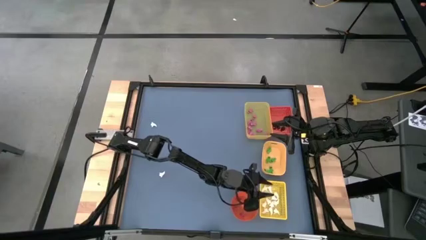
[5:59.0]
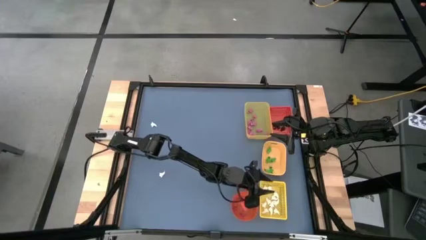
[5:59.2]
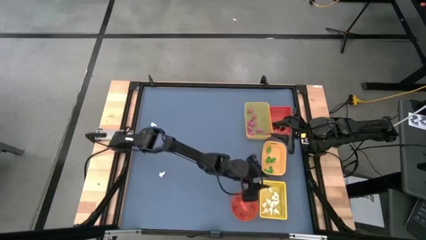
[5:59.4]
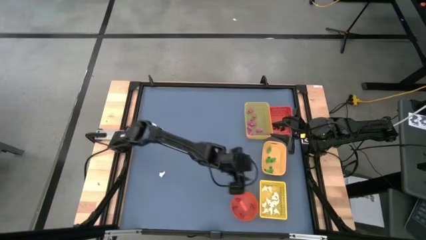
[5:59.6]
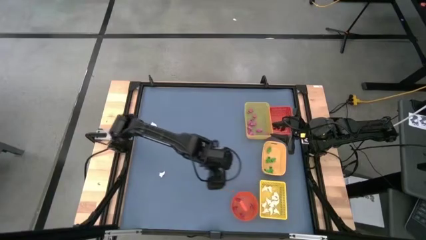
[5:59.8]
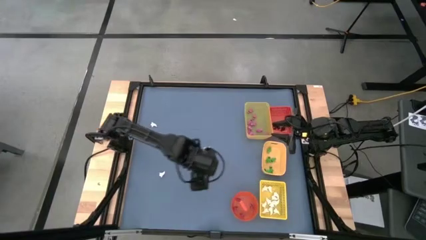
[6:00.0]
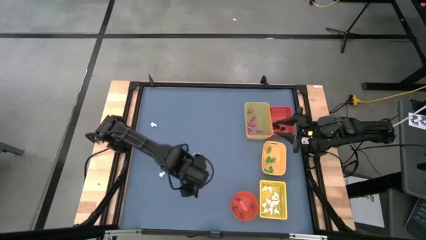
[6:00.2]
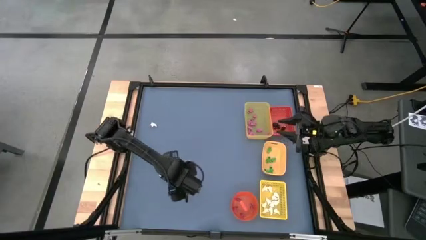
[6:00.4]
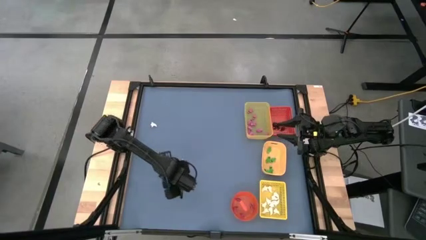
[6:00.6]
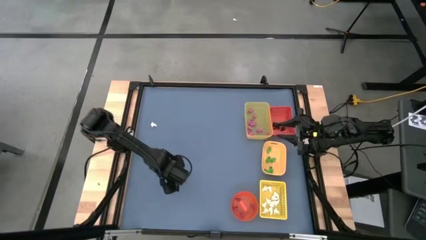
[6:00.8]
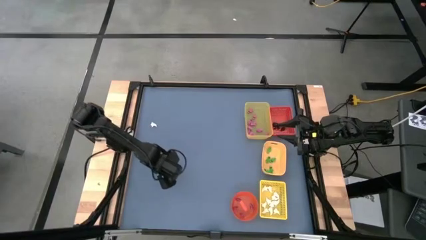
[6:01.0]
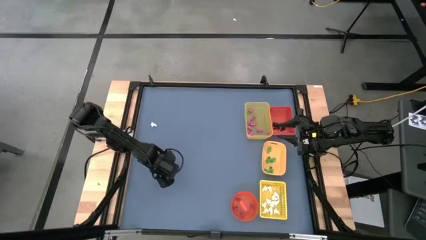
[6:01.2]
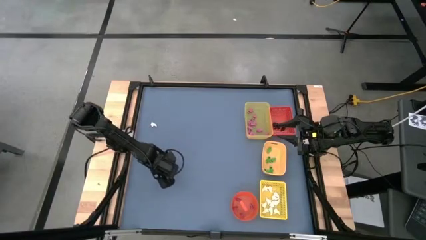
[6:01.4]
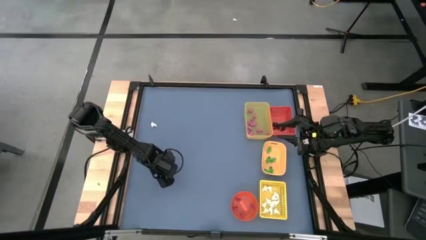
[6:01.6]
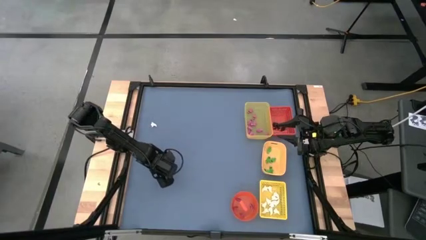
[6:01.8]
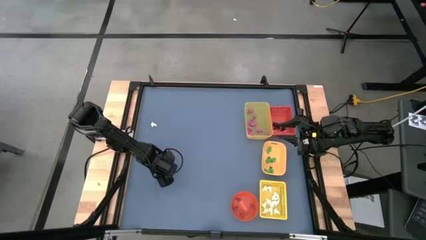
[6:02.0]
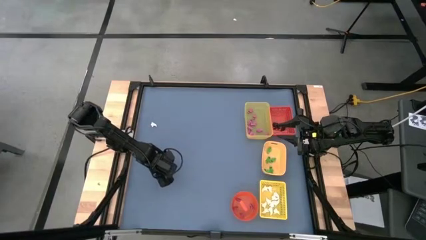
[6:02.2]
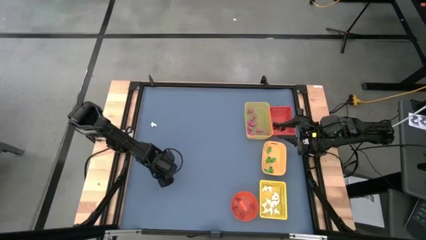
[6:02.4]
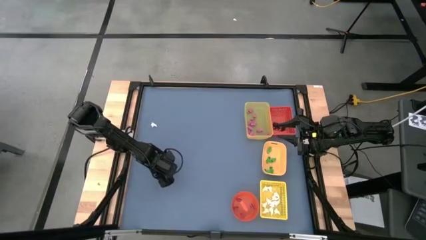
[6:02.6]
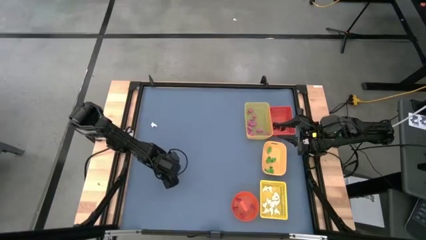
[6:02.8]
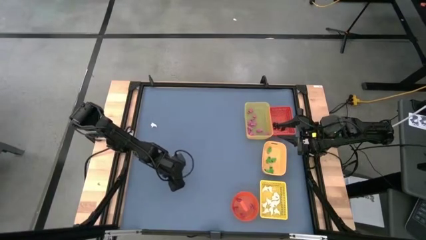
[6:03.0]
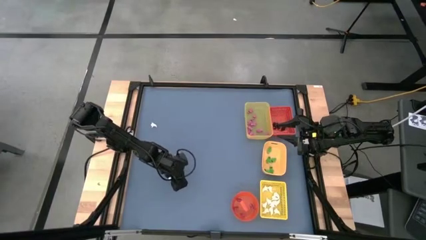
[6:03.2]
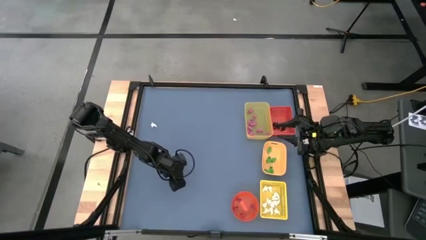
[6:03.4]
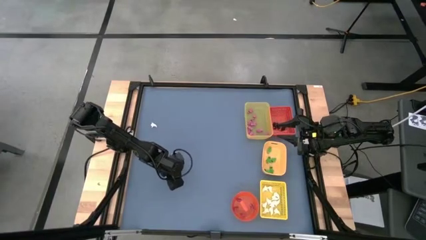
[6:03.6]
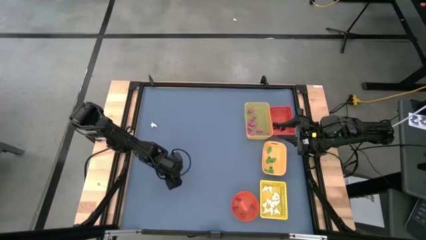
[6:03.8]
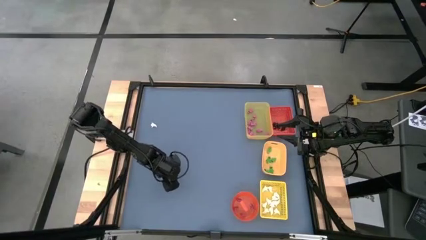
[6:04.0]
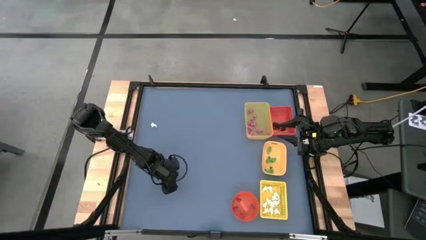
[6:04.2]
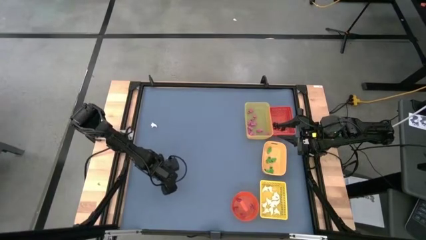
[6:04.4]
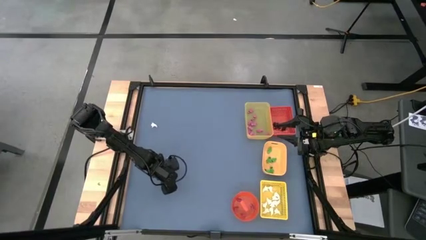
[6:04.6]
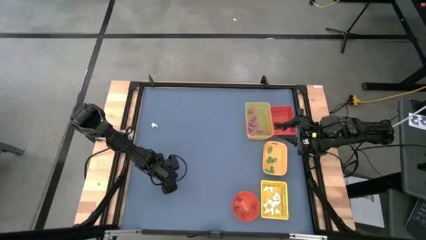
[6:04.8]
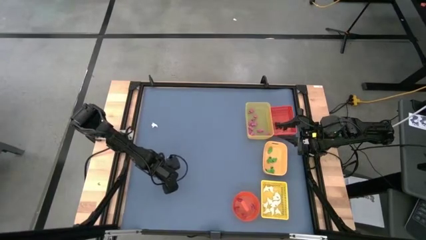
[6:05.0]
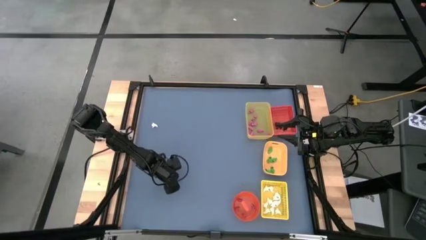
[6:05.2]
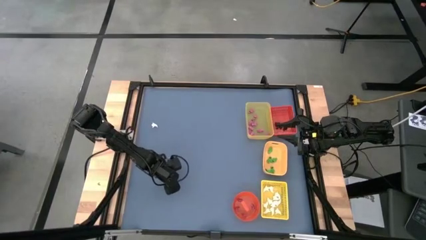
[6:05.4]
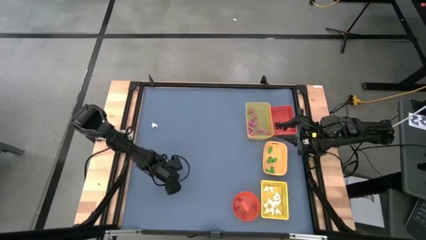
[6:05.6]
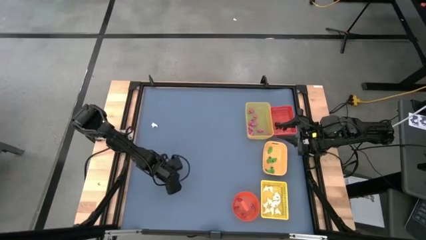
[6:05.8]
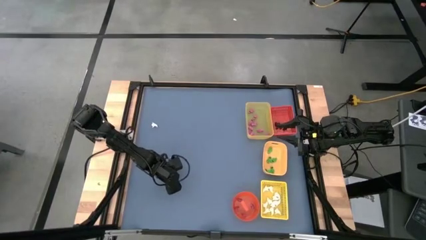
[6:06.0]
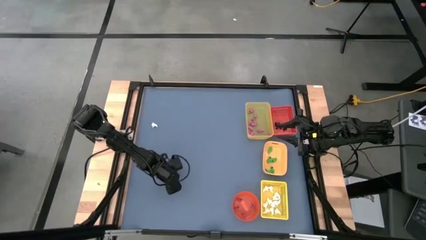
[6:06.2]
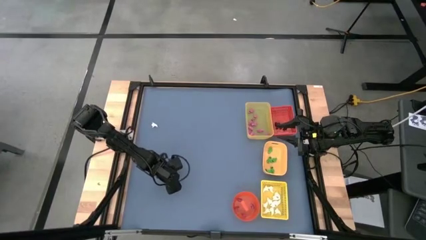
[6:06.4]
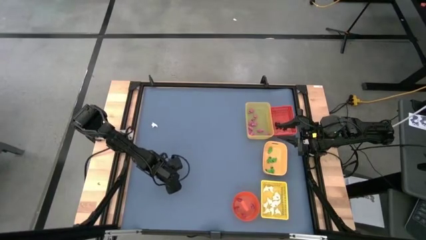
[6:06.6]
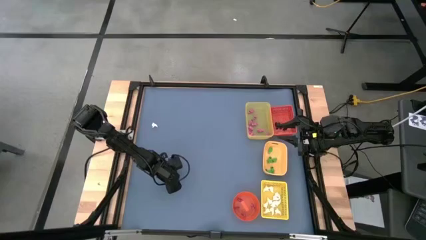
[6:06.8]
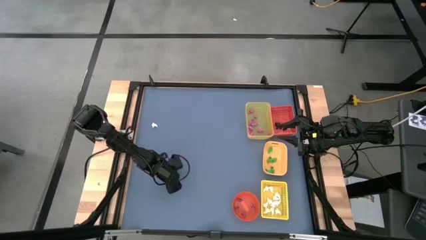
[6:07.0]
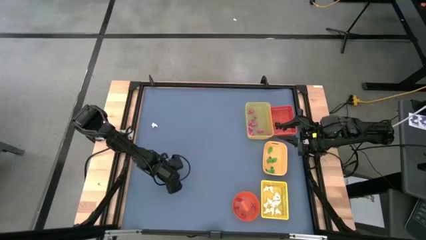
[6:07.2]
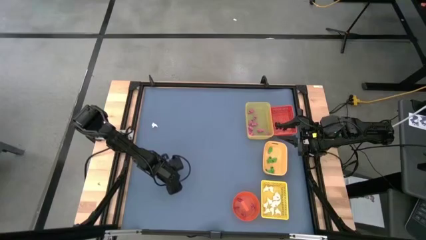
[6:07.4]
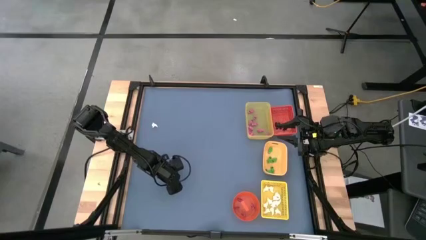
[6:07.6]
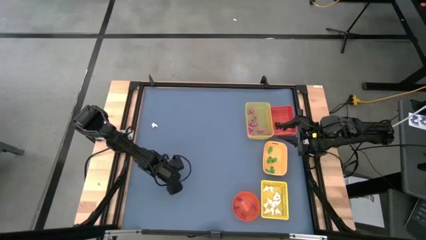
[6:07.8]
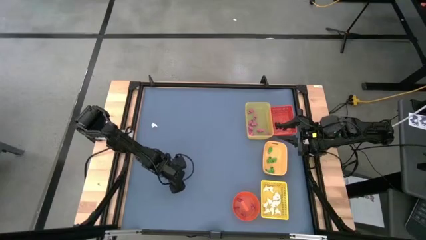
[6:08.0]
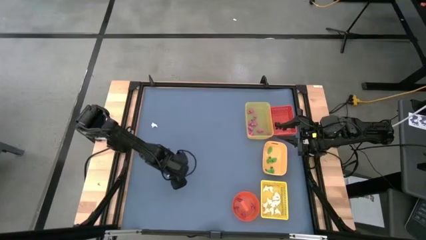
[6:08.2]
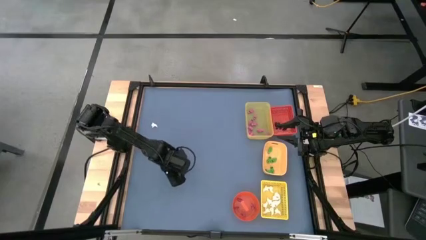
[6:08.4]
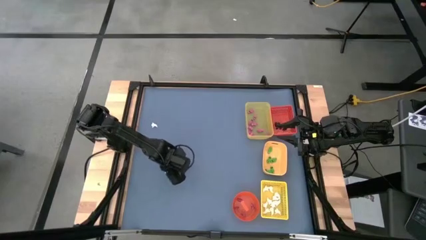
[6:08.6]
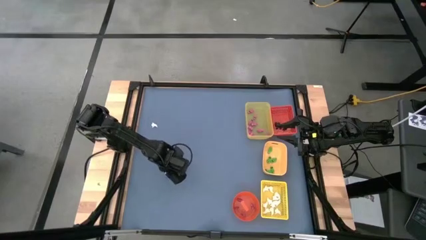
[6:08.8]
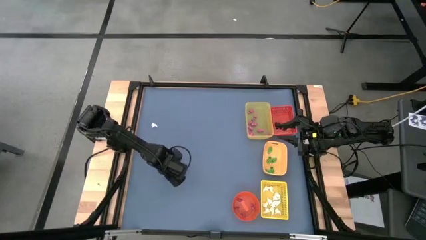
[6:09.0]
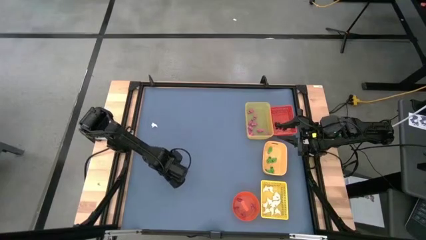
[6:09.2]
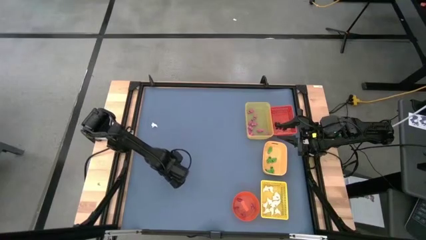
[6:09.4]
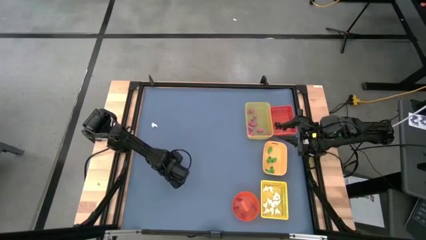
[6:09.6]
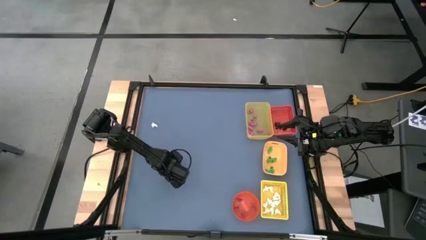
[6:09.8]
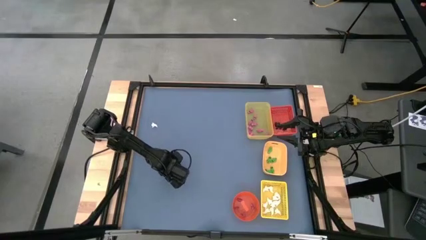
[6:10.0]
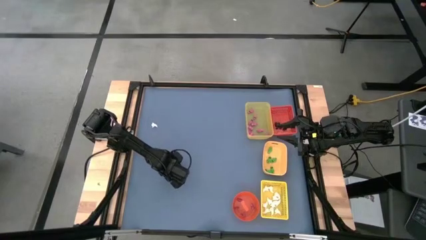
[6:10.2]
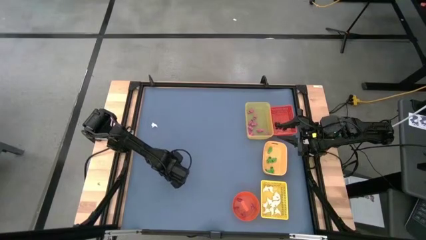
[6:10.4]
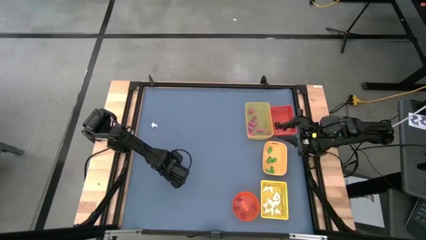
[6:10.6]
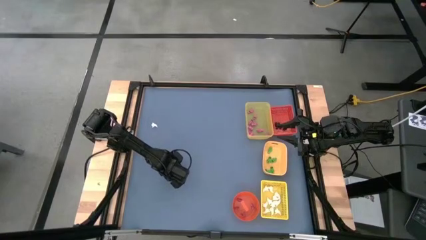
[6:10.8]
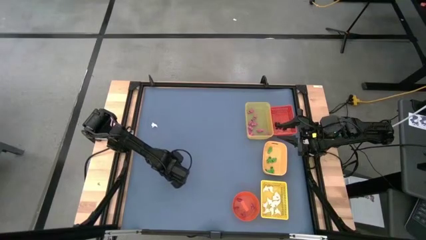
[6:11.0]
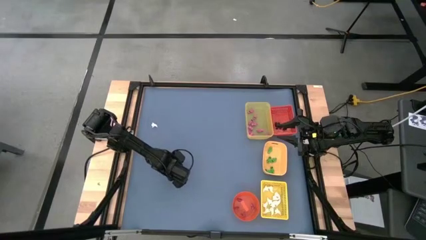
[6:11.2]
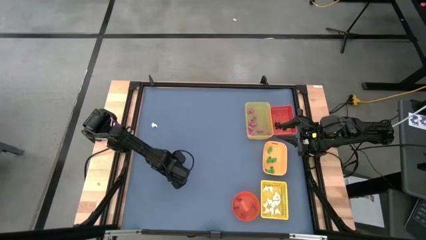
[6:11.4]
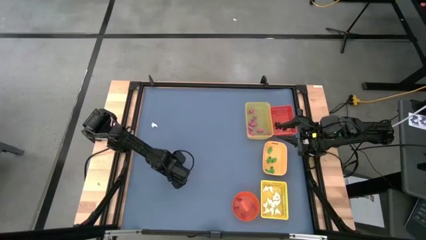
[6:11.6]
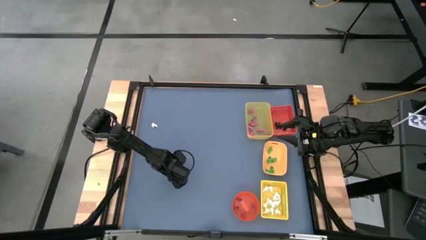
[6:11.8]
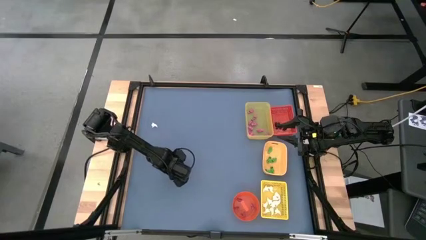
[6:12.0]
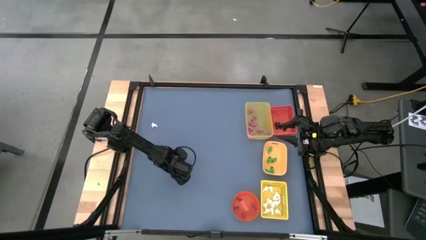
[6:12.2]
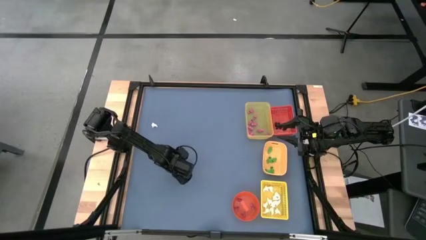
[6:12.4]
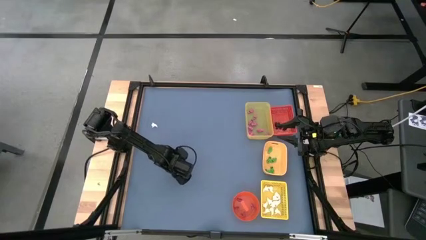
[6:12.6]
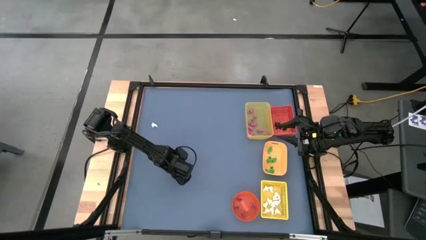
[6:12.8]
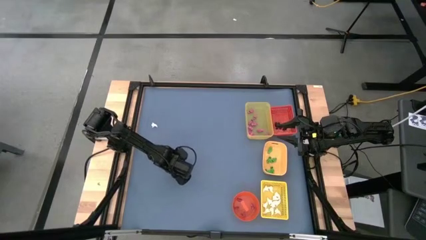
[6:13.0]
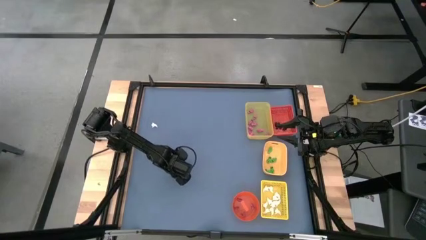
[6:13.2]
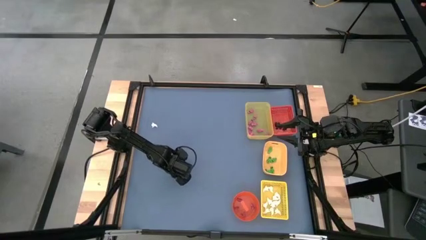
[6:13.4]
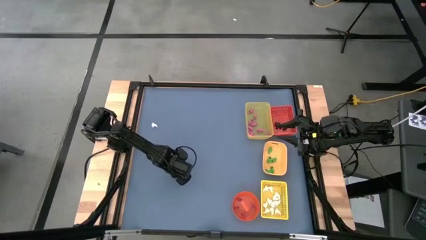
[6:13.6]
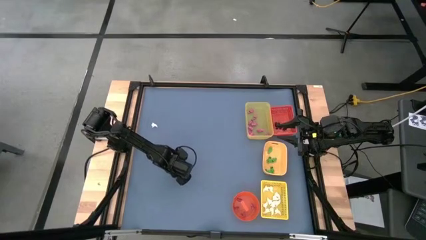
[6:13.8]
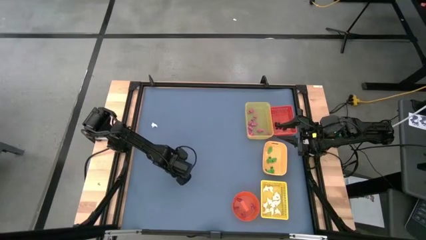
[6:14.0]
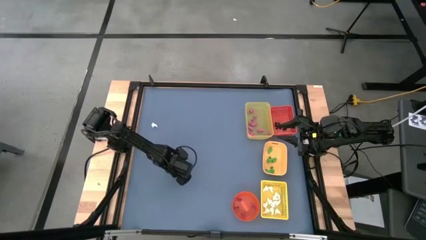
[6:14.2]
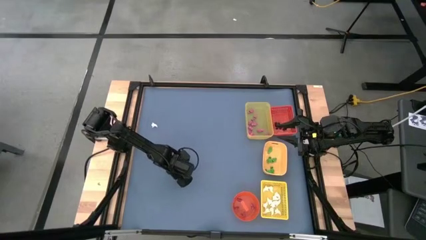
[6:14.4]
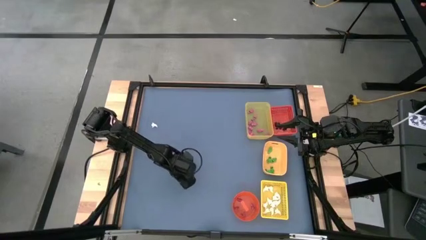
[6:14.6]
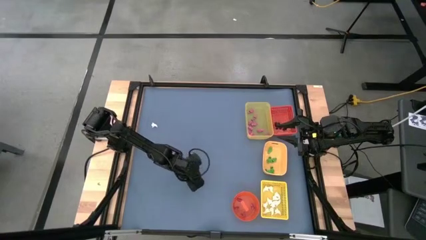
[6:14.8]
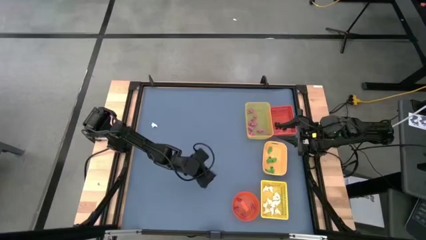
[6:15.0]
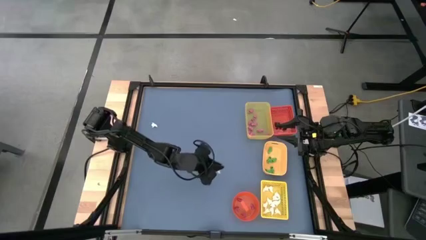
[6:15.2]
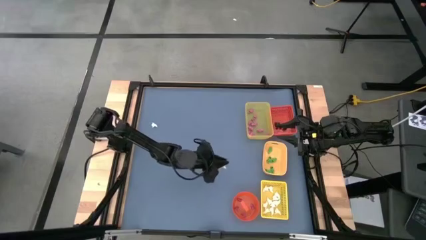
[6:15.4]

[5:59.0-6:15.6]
Task: Sort Halloween decoration
Put the white ghost toy into the yellow box
